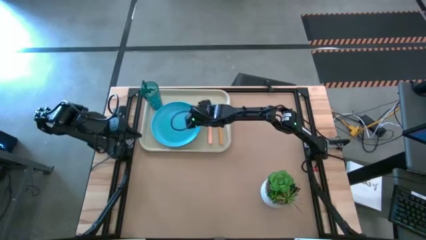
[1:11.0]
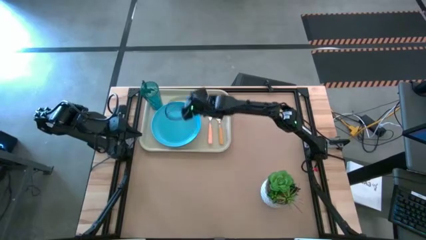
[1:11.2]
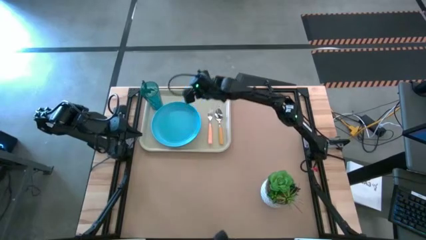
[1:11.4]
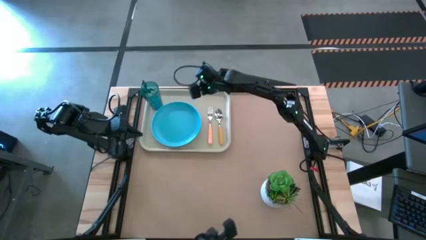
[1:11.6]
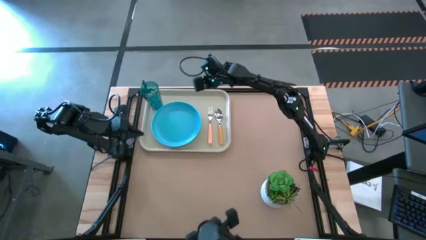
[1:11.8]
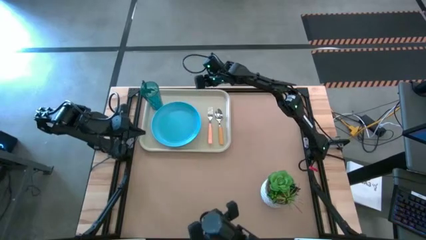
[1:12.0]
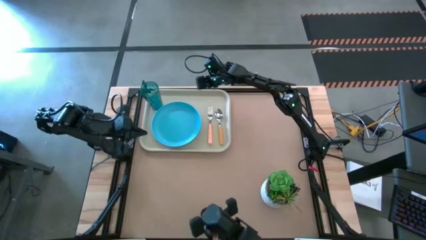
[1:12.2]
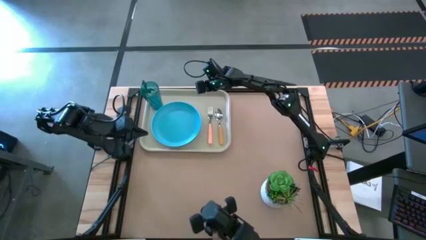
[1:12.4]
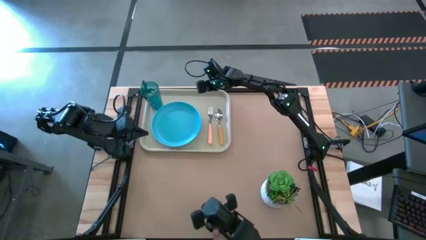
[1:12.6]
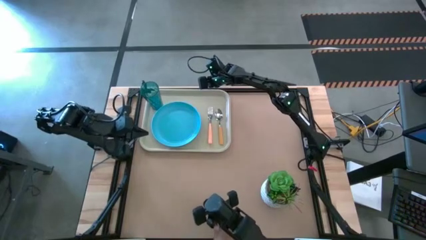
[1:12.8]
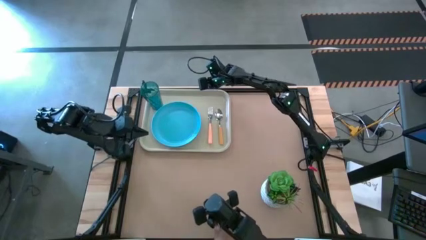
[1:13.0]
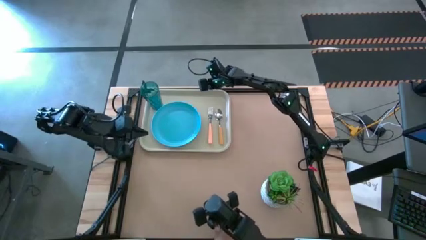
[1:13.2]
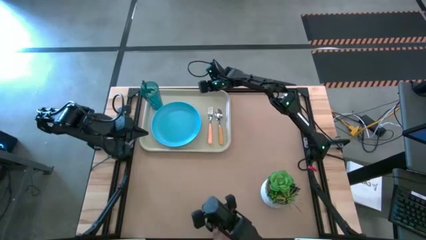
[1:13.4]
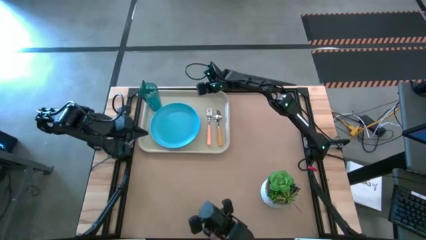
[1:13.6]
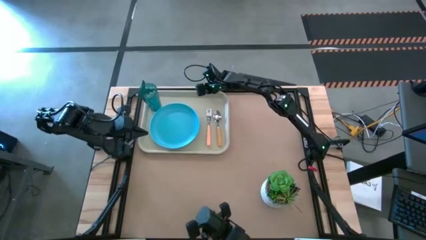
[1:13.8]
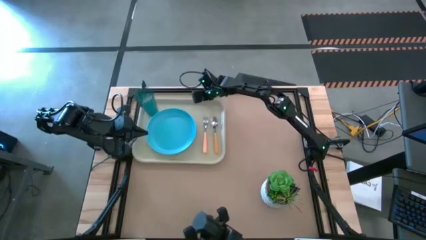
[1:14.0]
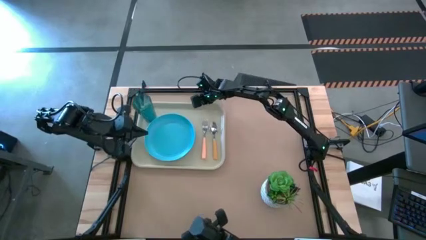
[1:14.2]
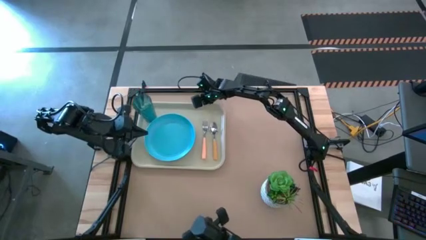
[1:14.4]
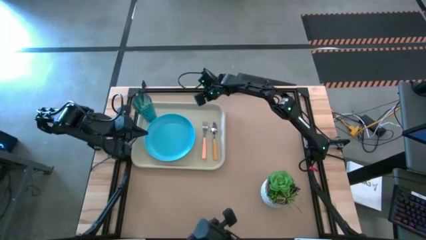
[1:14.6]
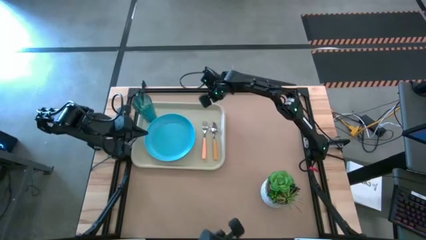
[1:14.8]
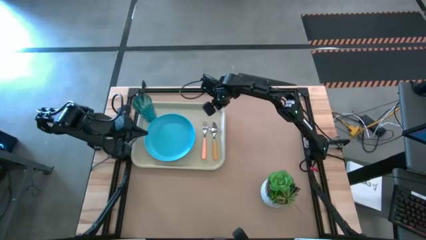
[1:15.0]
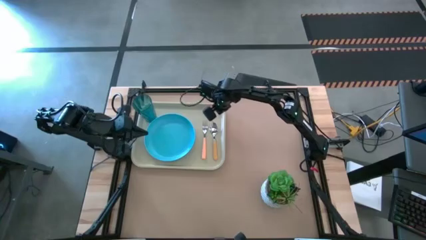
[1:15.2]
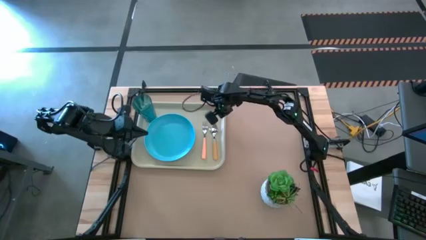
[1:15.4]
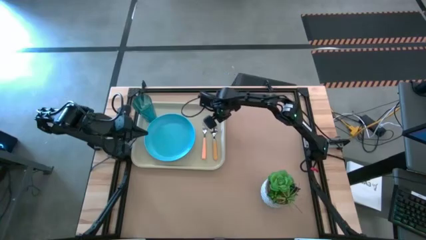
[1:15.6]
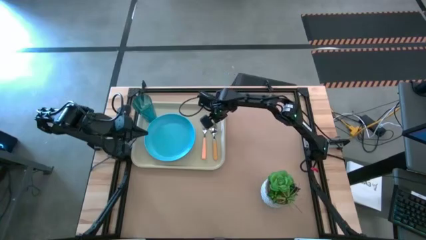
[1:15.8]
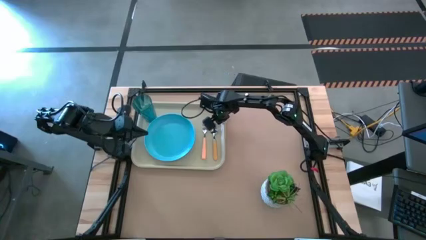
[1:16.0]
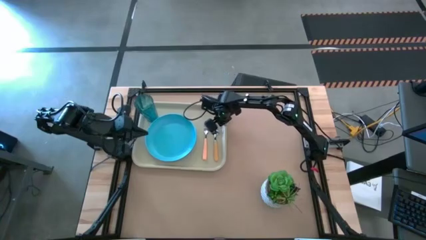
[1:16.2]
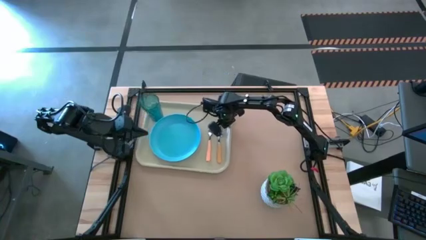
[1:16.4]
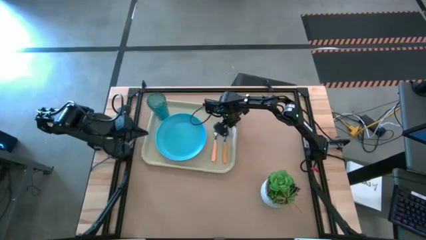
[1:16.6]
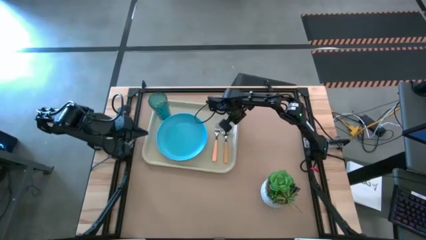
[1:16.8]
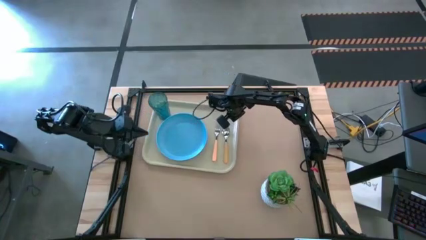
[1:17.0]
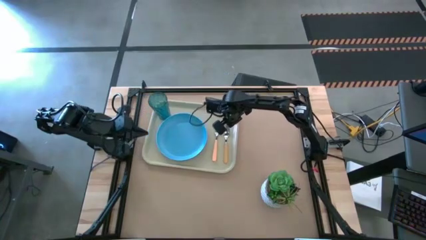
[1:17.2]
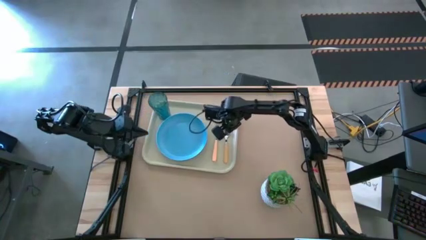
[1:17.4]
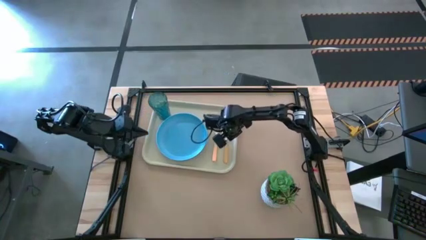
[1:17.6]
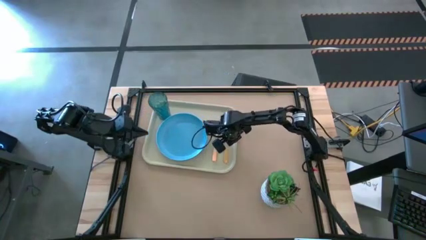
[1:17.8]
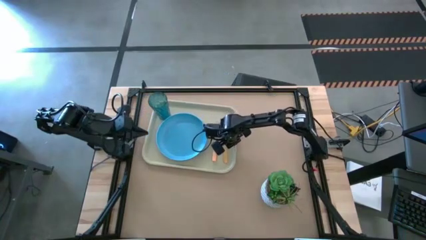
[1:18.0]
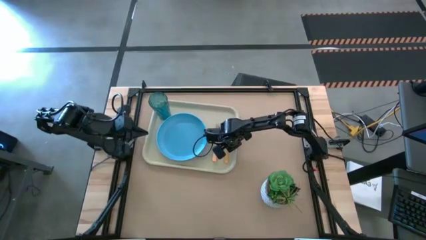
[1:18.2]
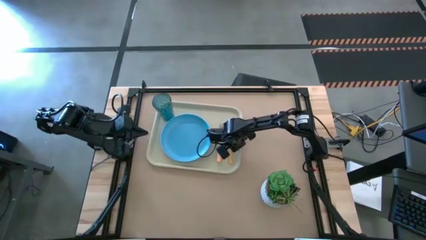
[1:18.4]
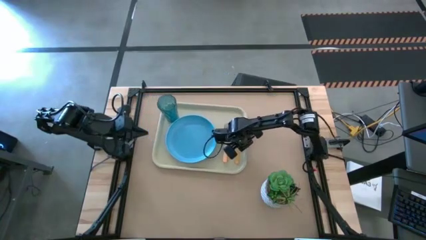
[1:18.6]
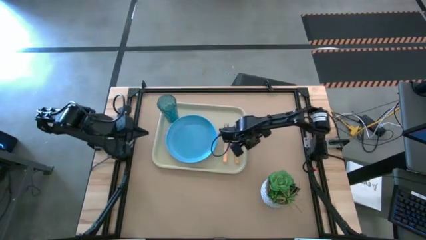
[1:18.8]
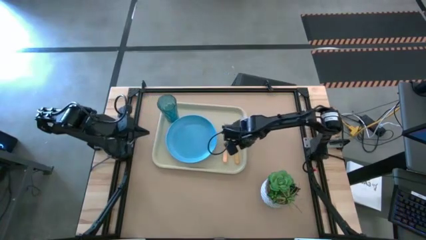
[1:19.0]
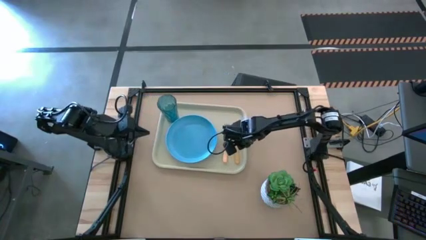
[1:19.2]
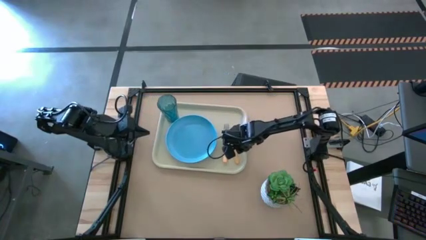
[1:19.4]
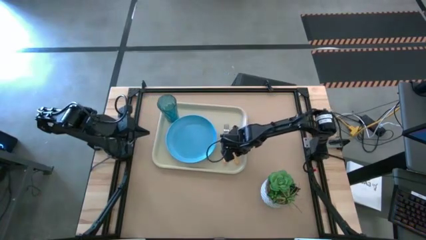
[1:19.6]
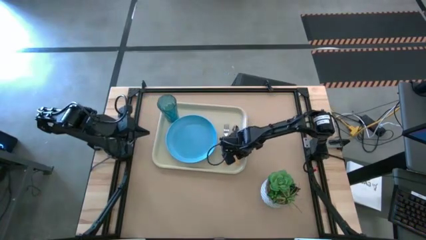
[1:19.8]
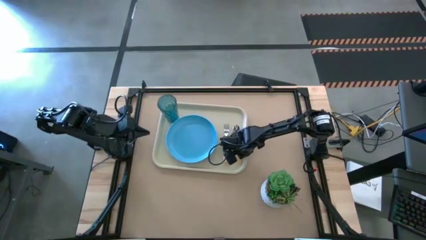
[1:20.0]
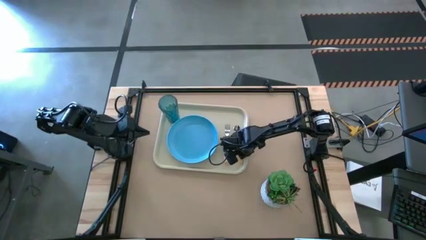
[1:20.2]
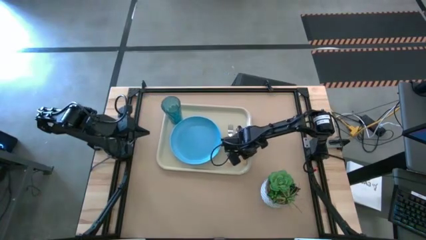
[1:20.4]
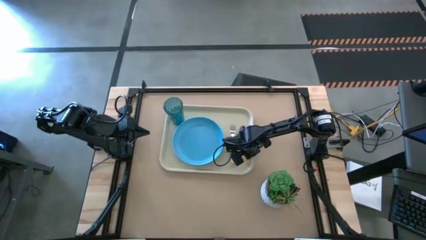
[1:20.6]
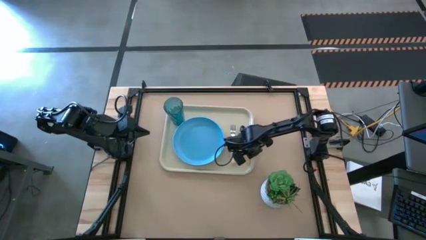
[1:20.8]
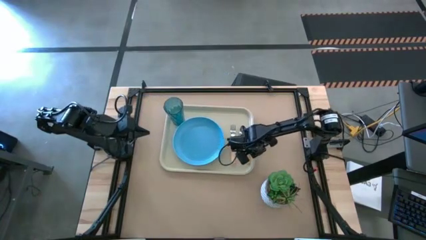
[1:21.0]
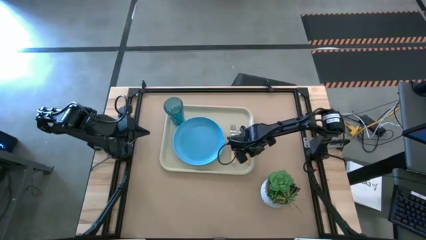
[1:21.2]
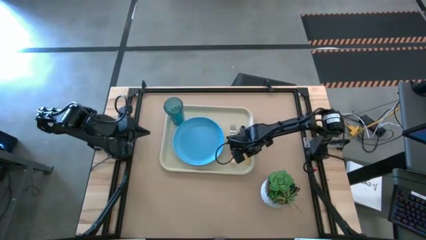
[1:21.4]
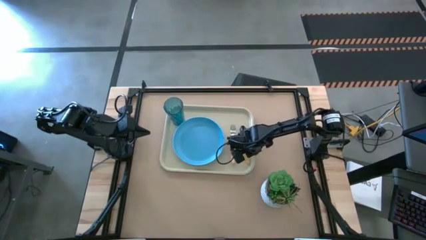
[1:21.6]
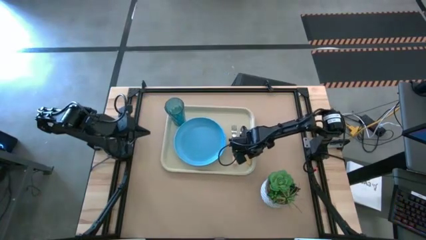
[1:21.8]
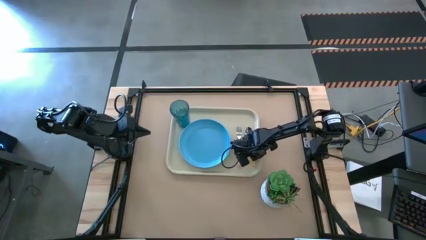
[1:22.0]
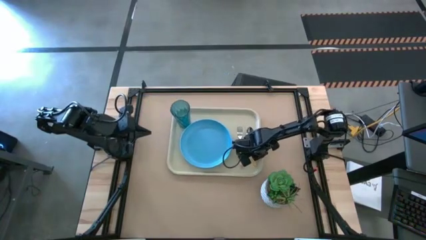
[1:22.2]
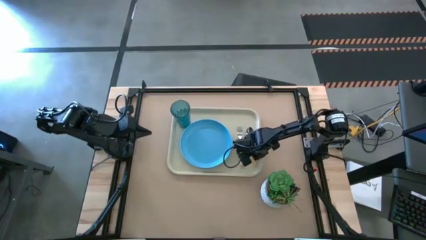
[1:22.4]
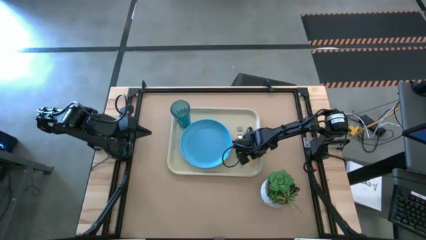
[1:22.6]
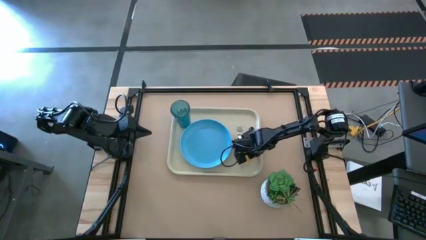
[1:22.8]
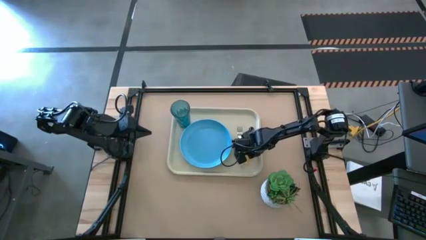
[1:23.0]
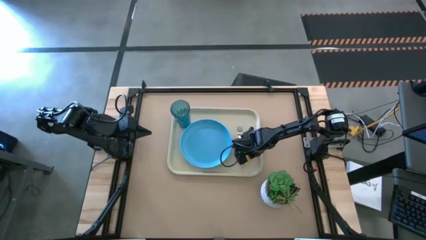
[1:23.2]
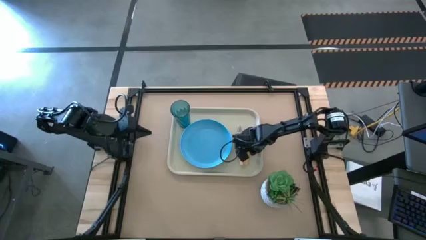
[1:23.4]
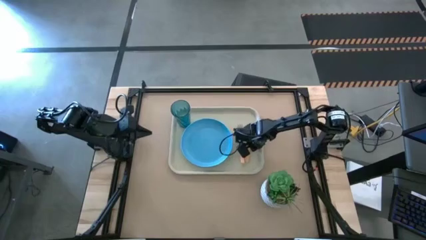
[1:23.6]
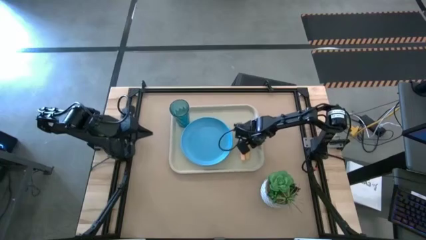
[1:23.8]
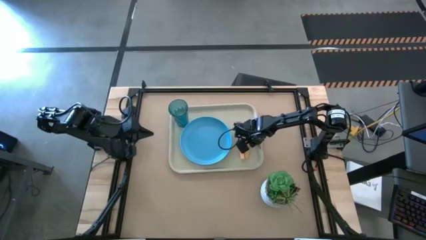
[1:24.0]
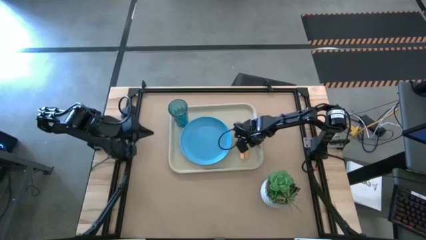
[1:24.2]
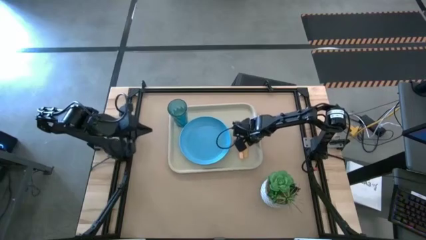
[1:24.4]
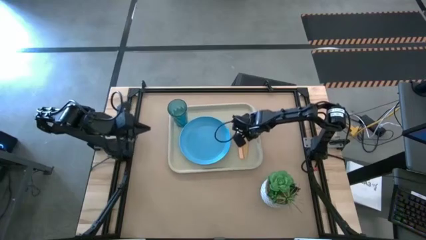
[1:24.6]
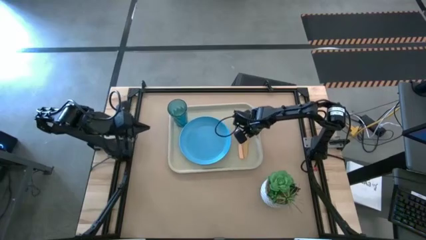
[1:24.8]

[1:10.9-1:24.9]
Task: Pick and place plate/cup/fork/spoon on tray
Move the white serving tray to the center of the table

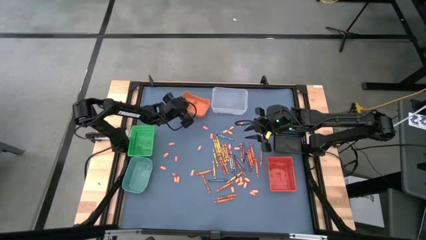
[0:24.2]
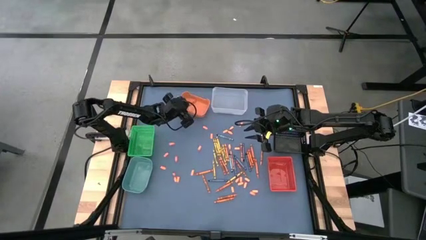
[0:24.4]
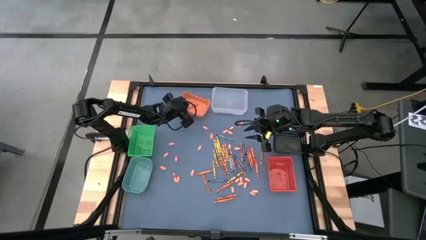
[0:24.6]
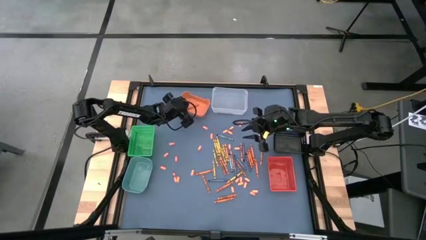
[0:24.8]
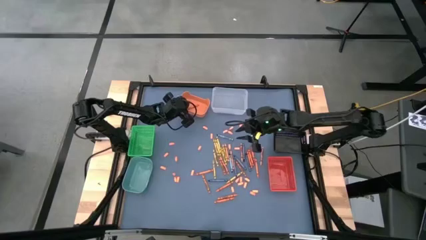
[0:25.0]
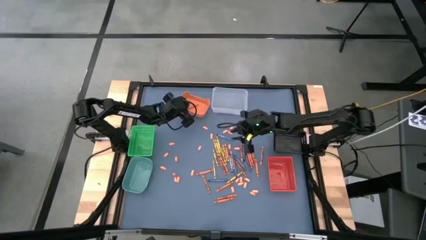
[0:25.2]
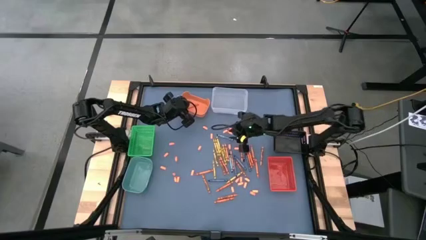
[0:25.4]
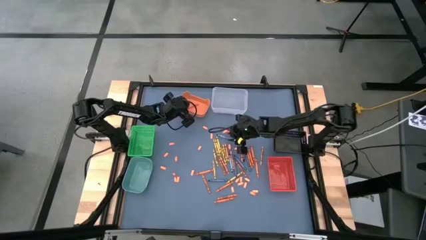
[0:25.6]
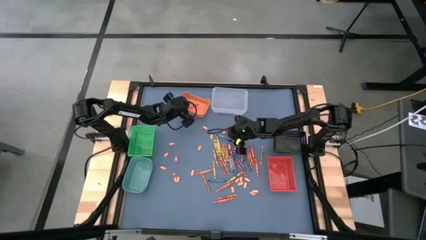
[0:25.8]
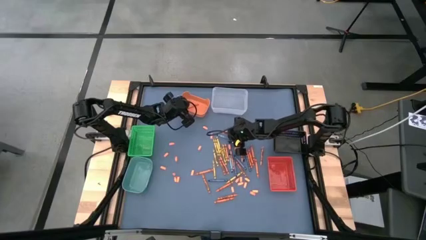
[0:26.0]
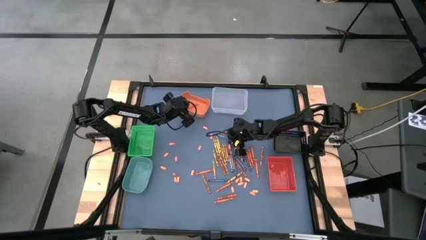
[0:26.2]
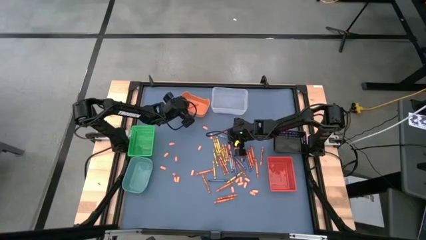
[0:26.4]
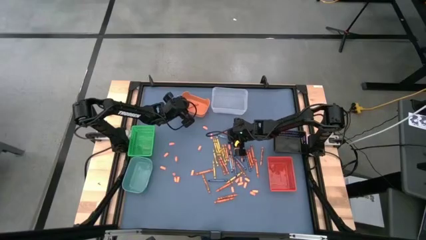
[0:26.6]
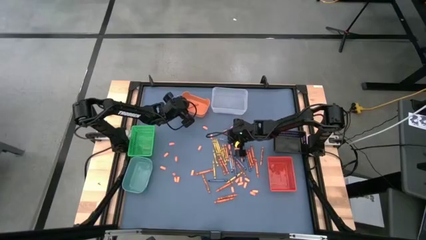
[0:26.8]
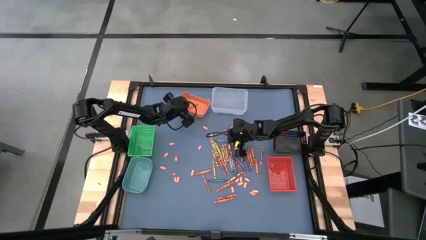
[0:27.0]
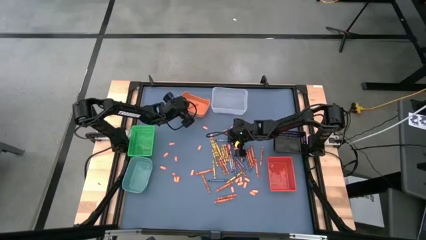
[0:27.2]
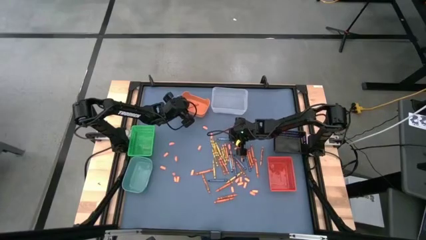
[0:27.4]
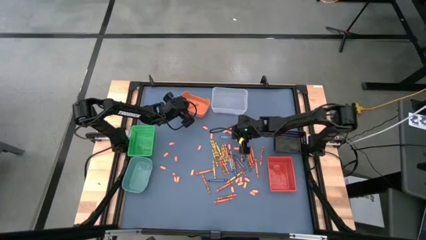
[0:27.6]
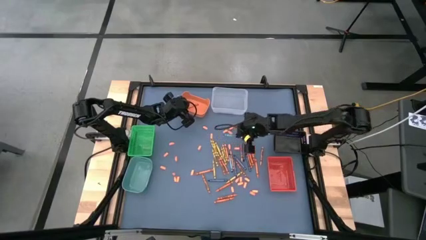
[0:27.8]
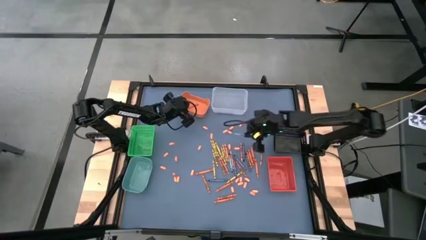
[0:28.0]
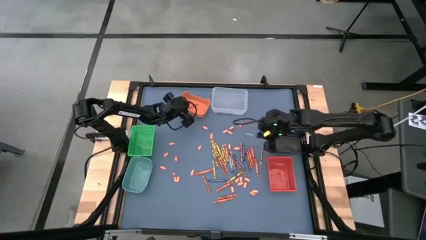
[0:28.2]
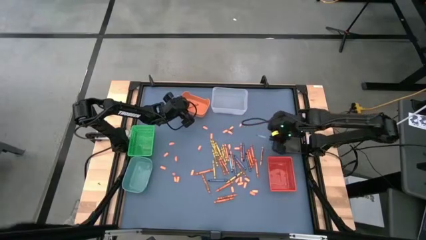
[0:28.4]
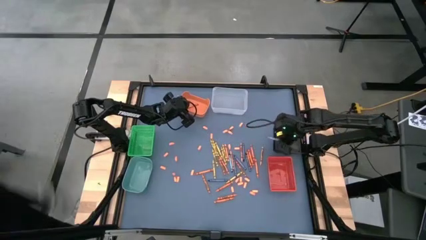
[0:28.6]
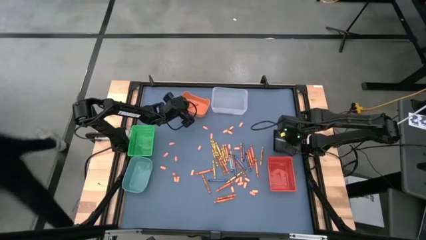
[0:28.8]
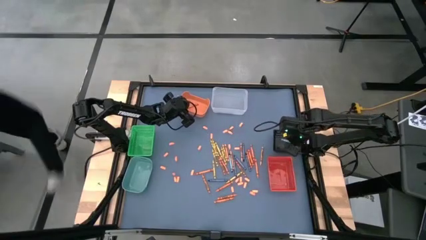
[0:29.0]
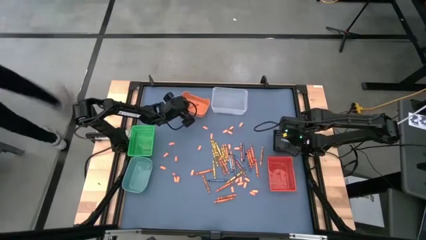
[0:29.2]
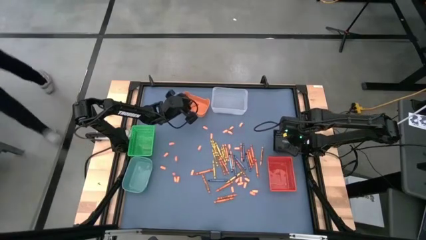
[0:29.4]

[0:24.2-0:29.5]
Task: Sort crayons
Put the light blue crayon into the black bin
